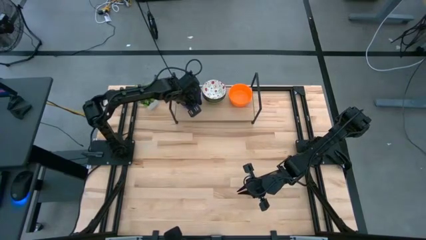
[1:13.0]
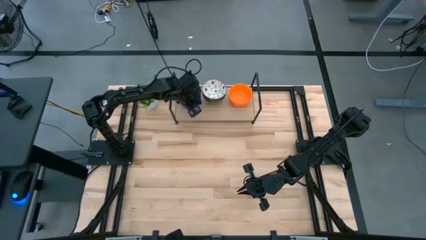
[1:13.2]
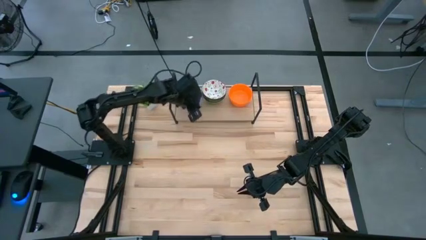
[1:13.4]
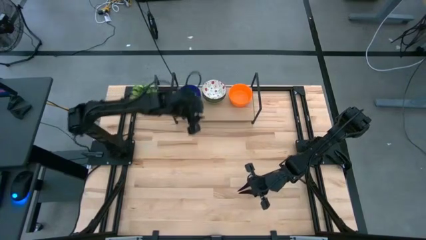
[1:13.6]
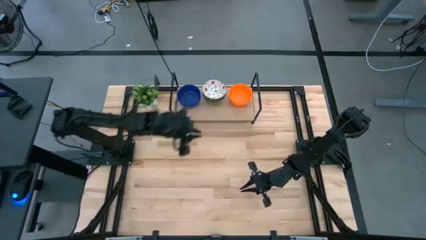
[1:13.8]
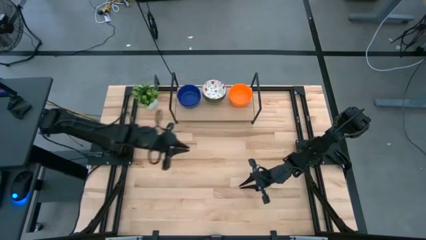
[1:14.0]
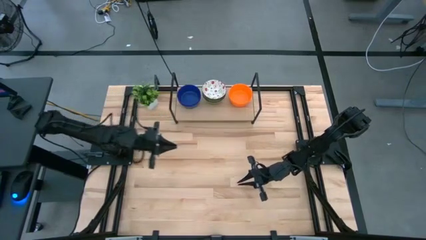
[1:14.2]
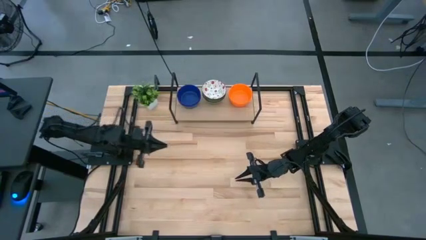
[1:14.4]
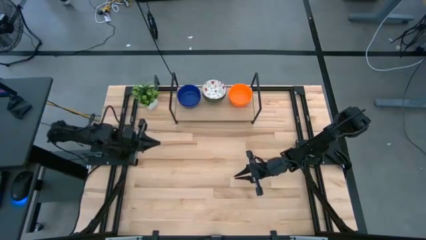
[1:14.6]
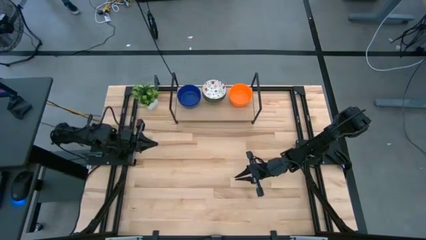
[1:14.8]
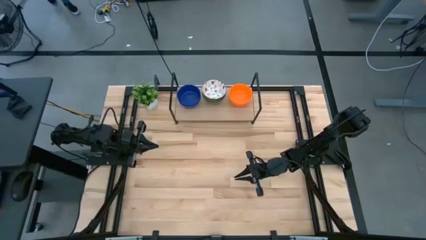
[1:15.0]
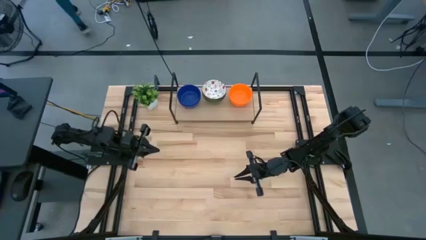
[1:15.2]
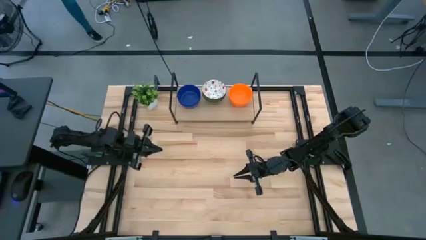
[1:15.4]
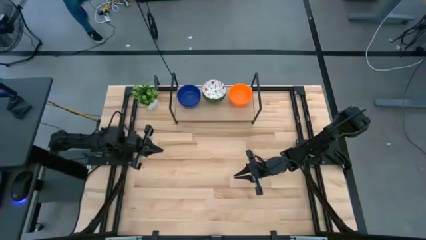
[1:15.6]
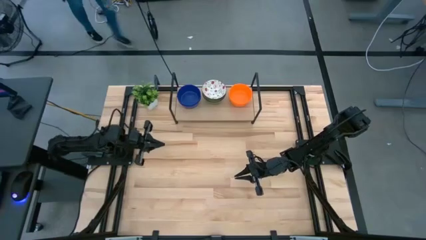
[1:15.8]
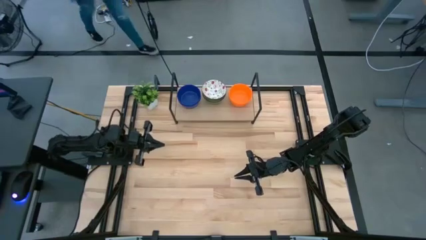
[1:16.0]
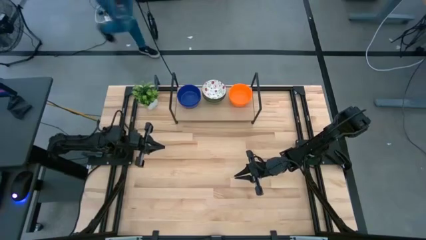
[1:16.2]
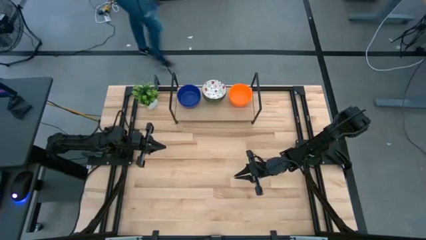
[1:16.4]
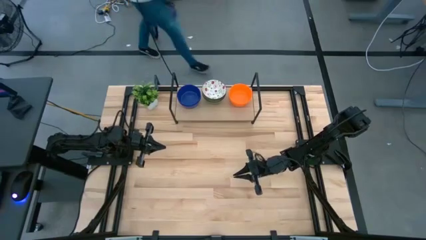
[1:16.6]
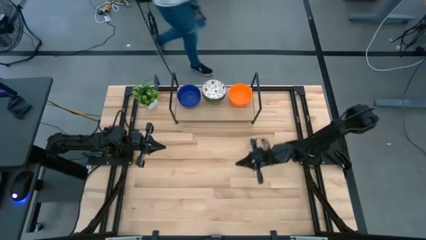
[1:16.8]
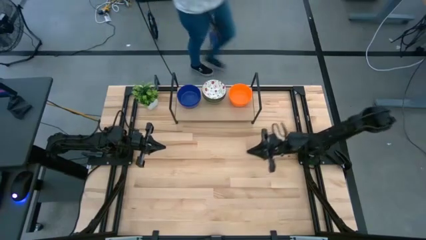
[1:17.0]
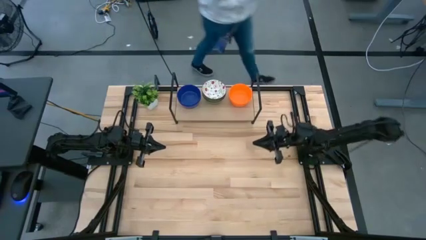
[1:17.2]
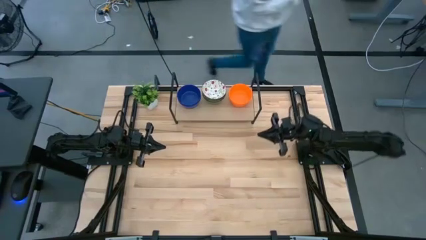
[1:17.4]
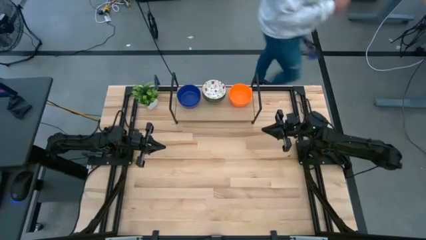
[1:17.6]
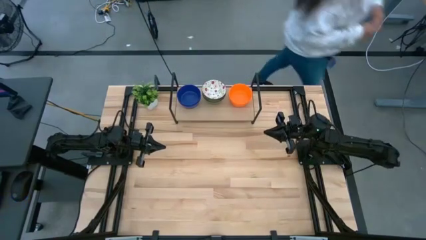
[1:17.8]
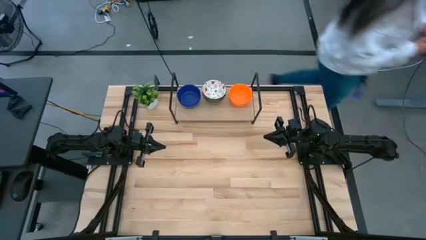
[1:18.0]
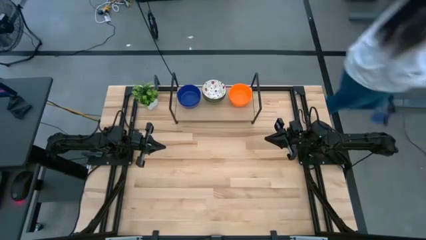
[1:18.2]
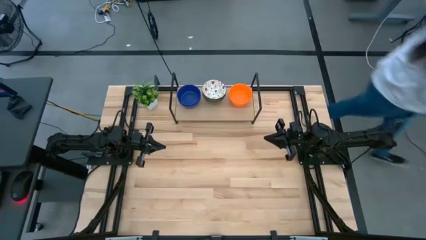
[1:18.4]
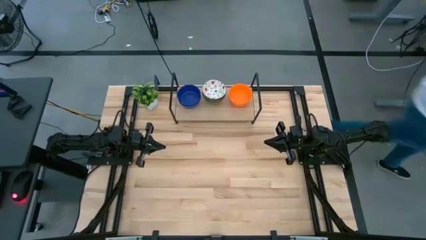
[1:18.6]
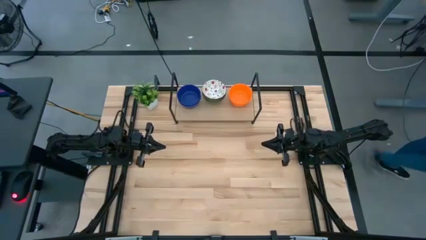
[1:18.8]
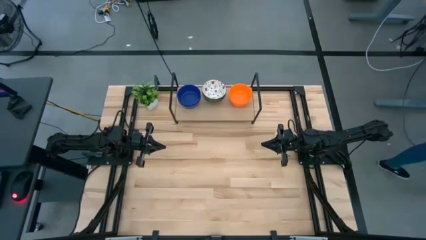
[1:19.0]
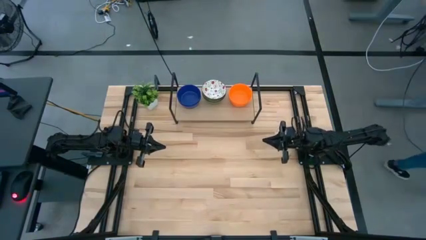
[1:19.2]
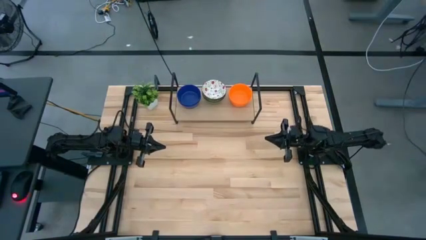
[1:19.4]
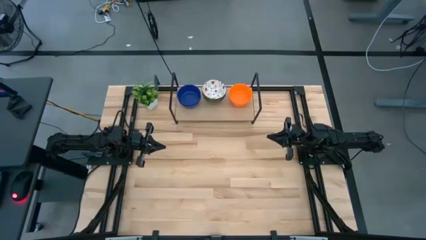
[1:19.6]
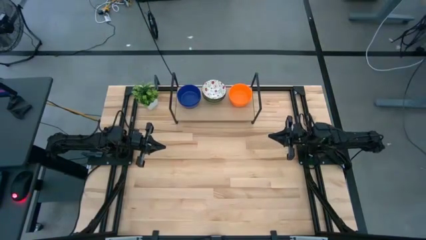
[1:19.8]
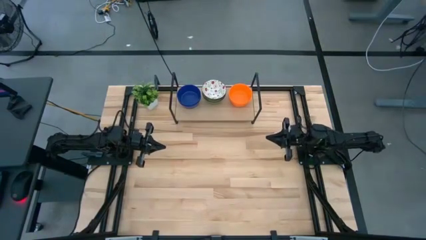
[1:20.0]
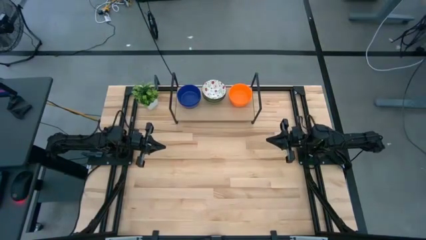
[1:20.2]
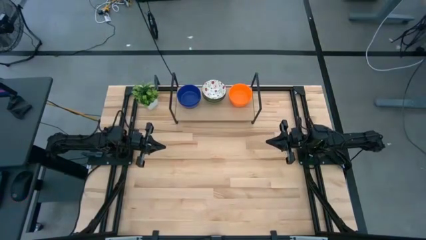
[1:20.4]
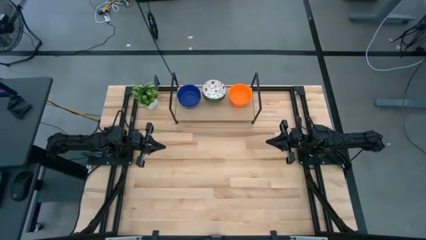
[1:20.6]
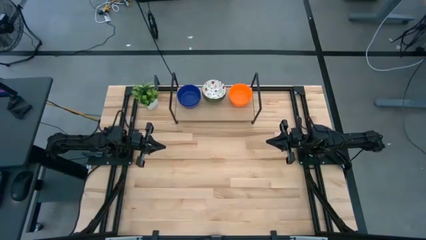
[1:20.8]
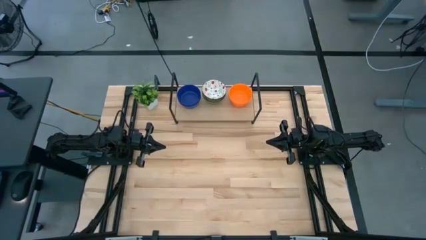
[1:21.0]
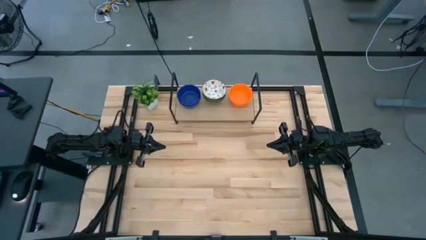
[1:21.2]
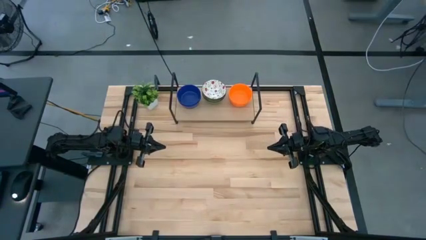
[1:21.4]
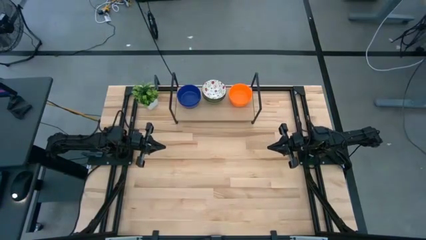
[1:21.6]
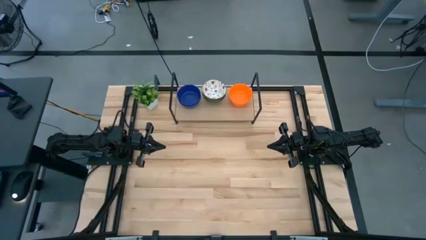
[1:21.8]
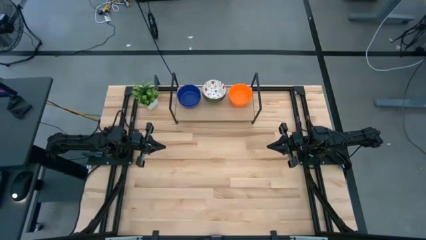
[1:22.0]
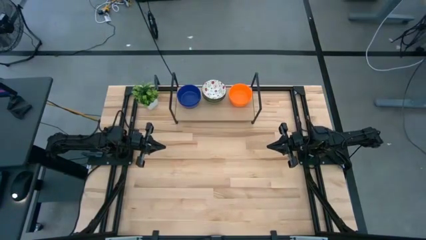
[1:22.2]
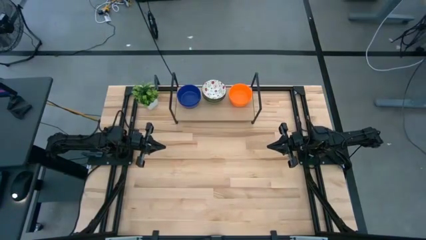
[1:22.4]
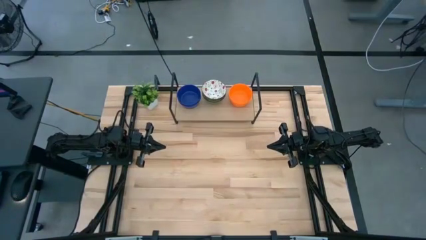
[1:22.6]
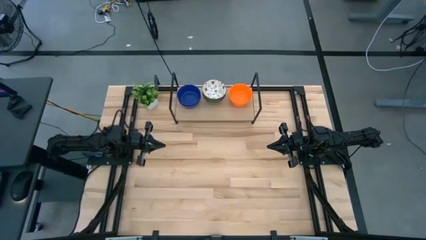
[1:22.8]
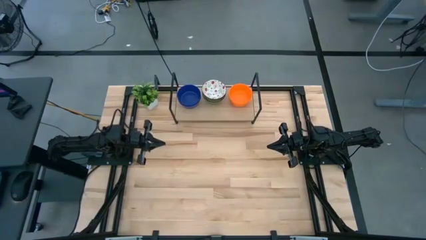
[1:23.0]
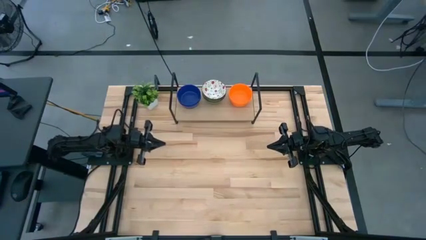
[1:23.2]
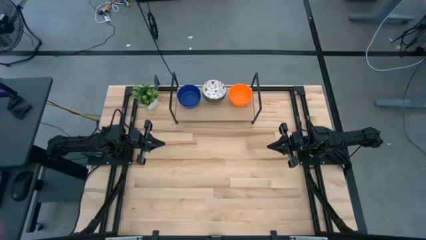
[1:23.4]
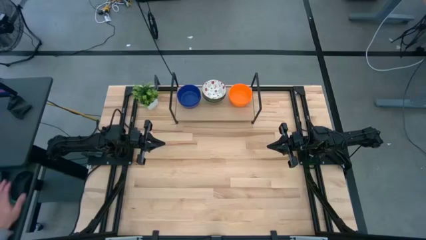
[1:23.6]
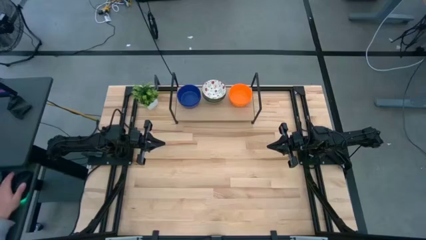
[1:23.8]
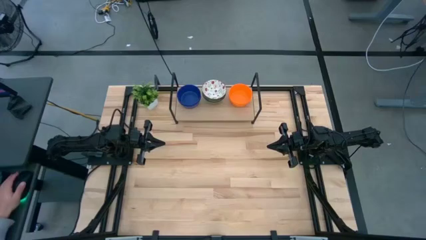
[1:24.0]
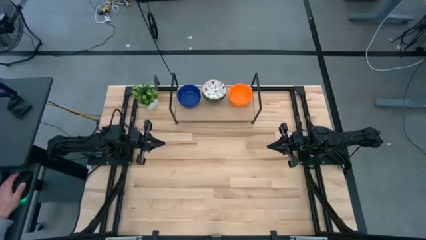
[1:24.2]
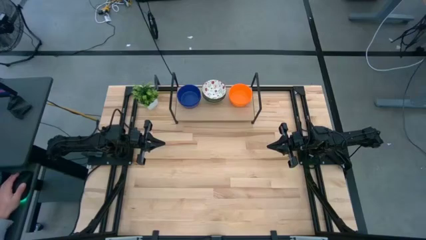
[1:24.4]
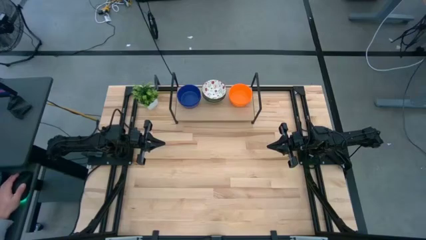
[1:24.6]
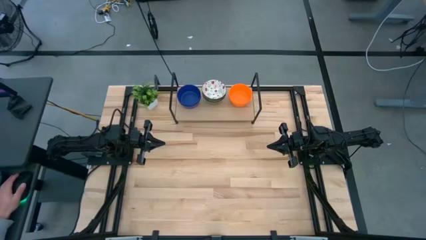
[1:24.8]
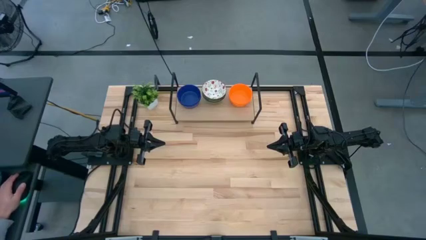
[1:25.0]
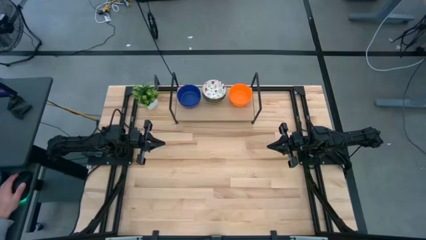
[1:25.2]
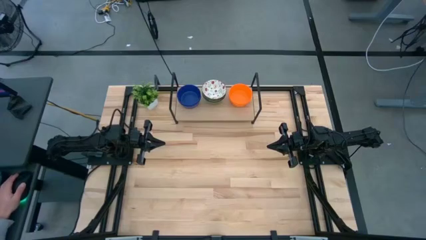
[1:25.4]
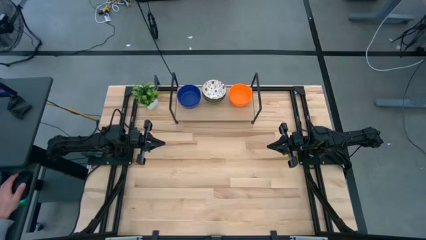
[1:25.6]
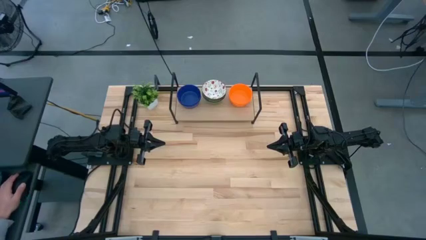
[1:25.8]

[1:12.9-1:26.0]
Task: Pick & Place Mini bowls
Return to Home Position

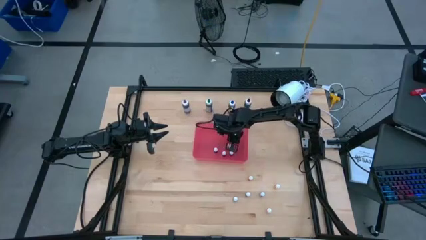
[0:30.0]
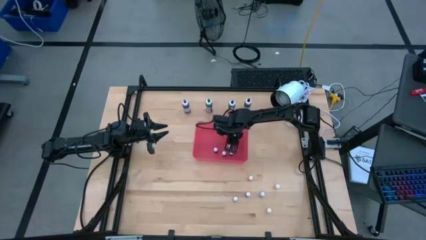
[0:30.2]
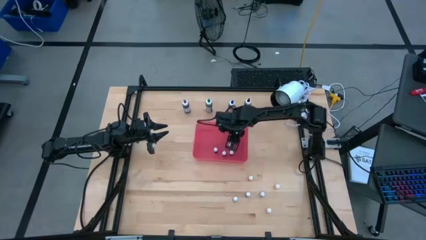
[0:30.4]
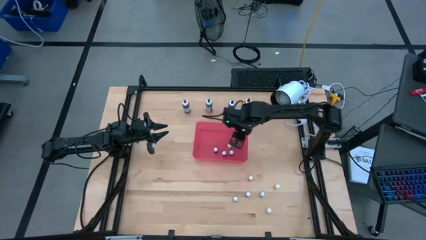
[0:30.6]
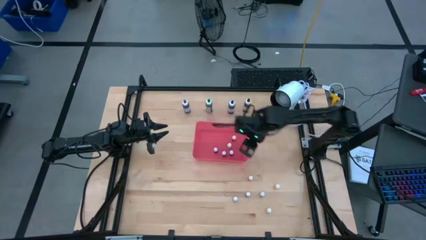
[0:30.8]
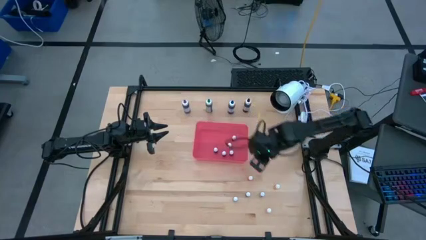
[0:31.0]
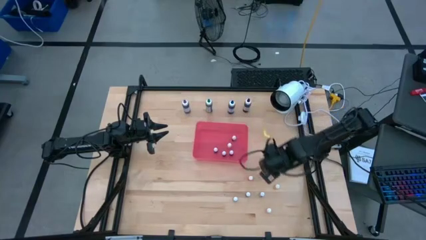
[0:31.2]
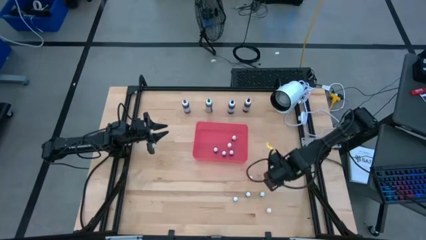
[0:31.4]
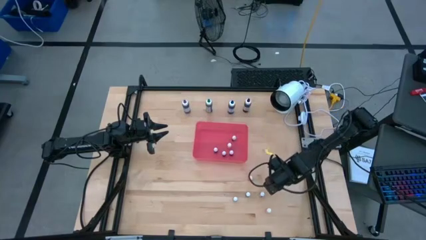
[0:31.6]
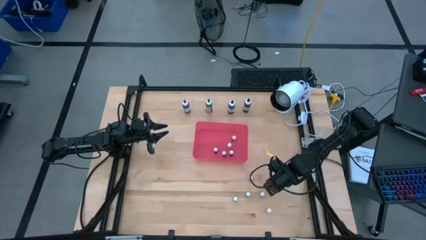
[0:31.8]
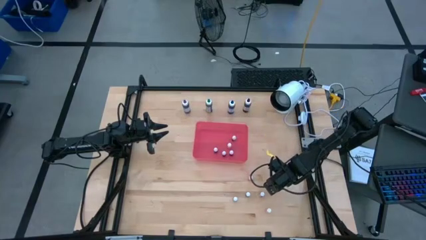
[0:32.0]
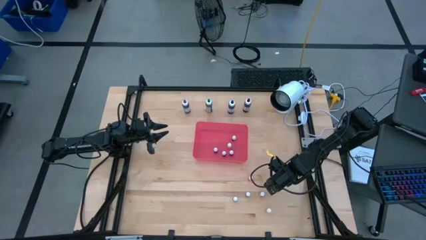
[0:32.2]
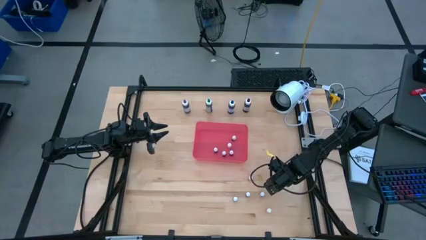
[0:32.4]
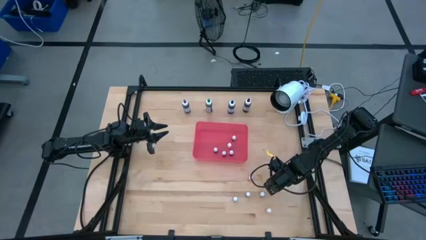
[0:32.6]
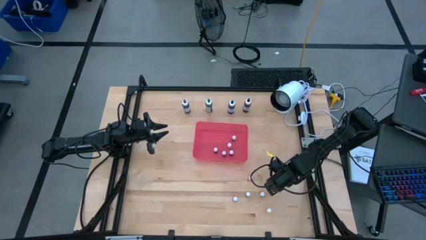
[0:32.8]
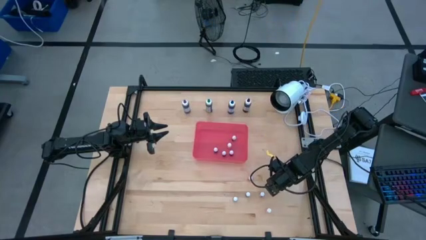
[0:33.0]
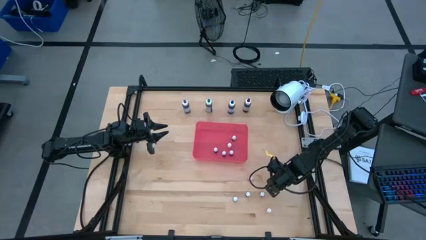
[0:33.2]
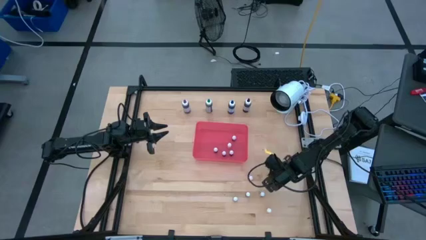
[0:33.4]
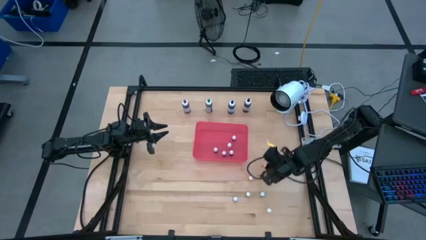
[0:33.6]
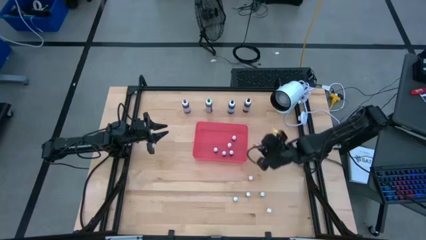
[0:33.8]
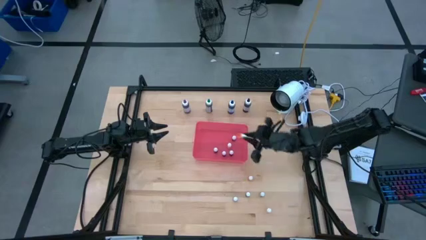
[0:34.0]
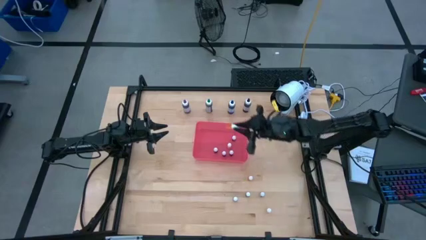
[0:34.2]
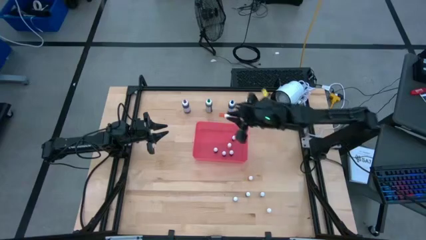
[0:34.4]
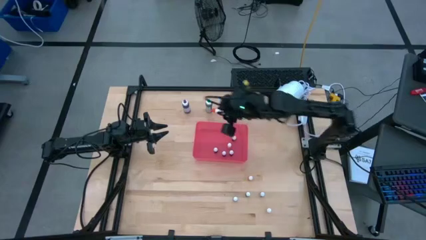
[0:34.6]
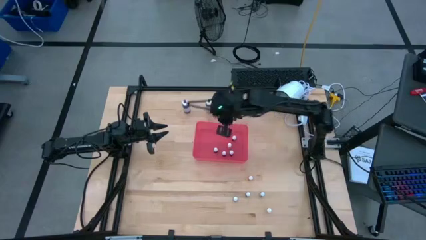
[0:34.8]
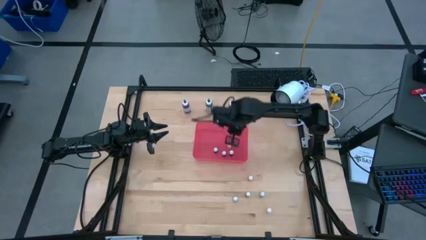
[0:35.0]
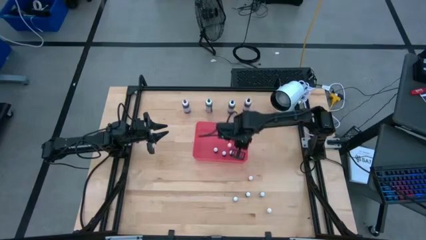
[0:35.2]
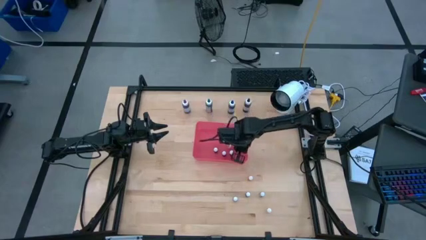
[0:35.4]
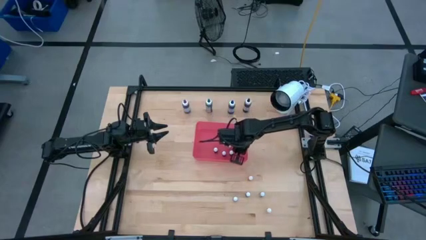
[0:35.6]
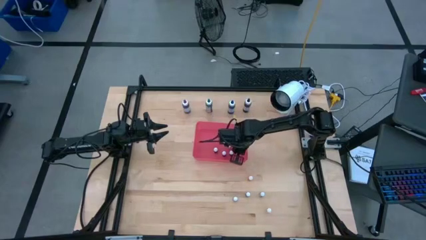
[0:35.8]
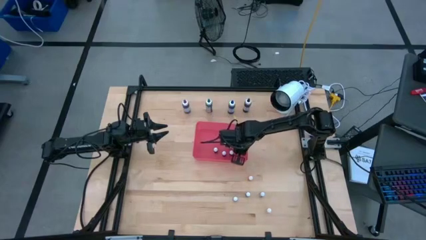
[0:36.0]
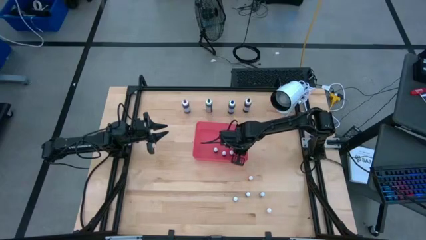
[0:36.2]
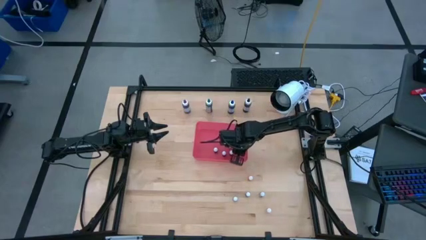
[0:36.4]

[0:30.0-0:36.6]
Task: Pick & Place food coloring
Put the small orange food coloring bottle into the red bin
